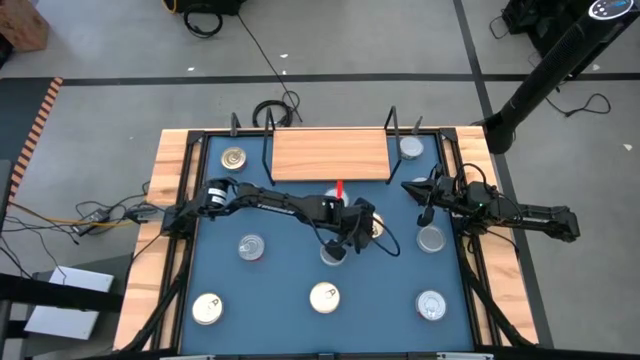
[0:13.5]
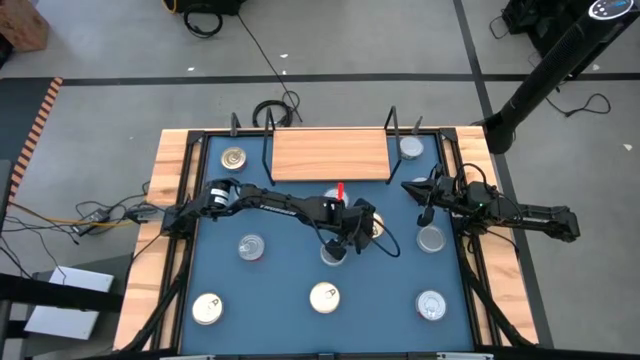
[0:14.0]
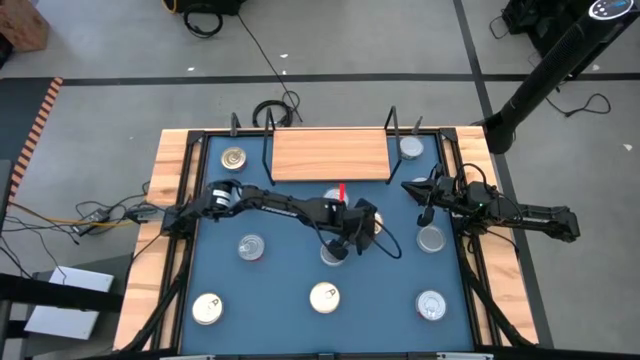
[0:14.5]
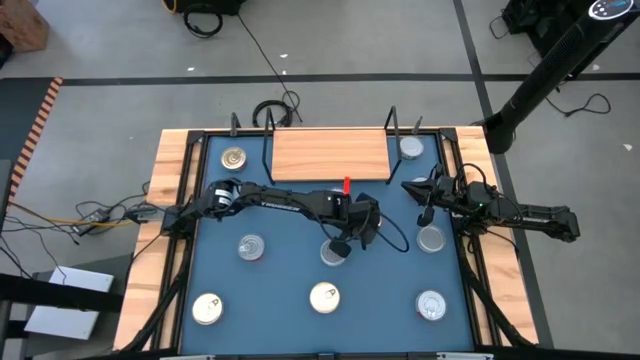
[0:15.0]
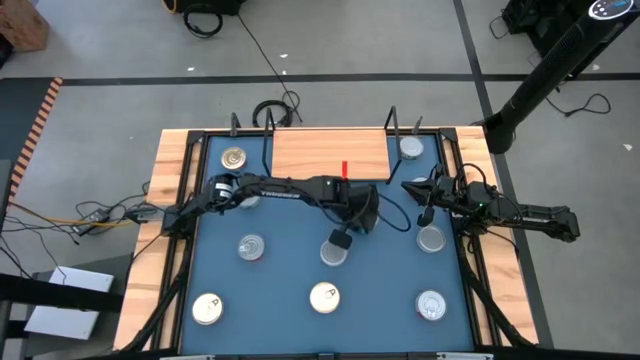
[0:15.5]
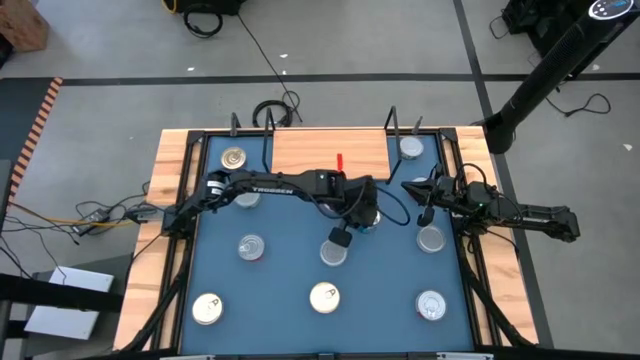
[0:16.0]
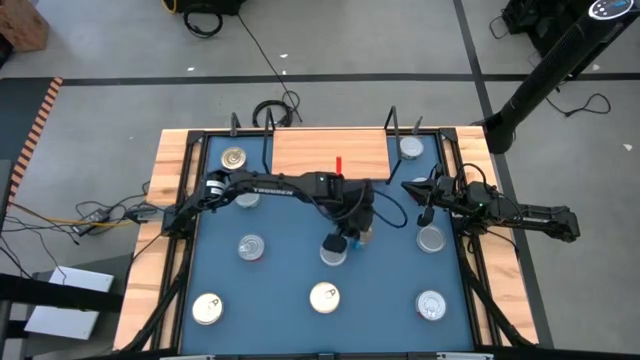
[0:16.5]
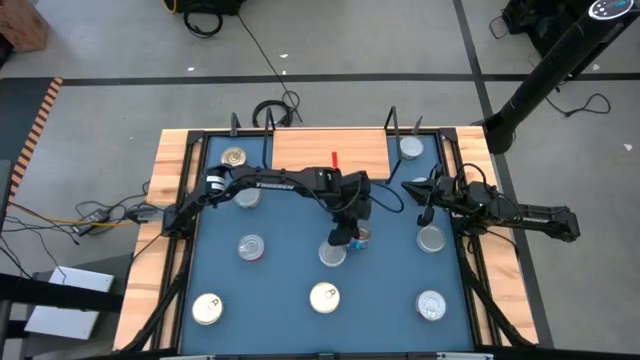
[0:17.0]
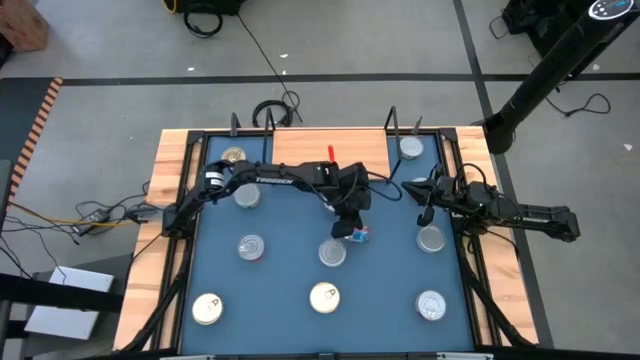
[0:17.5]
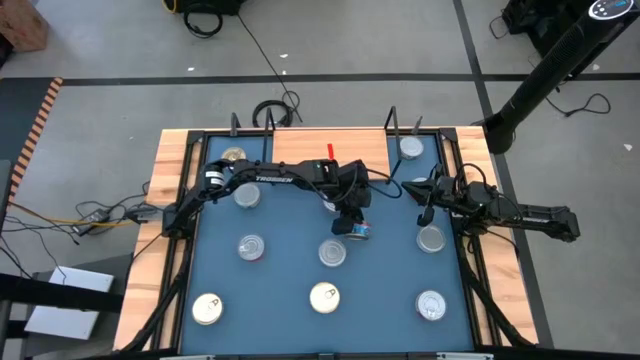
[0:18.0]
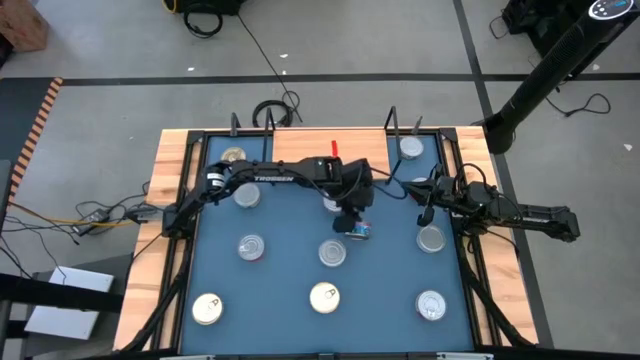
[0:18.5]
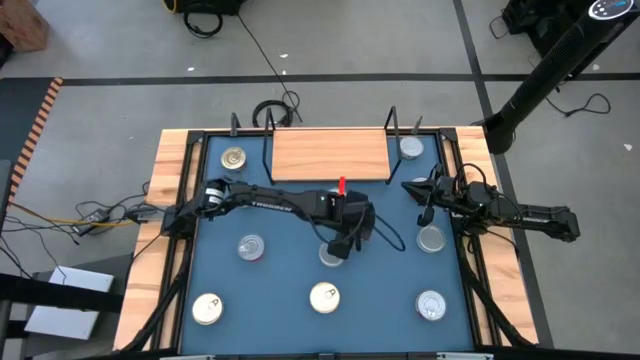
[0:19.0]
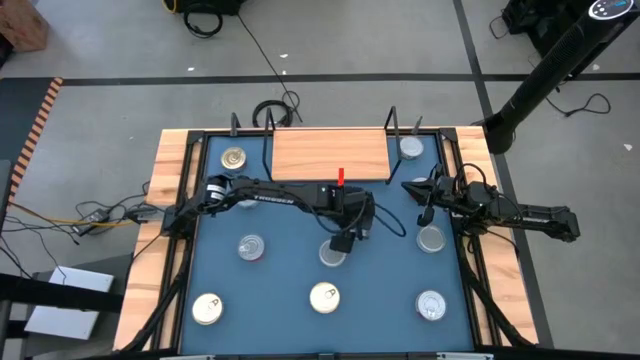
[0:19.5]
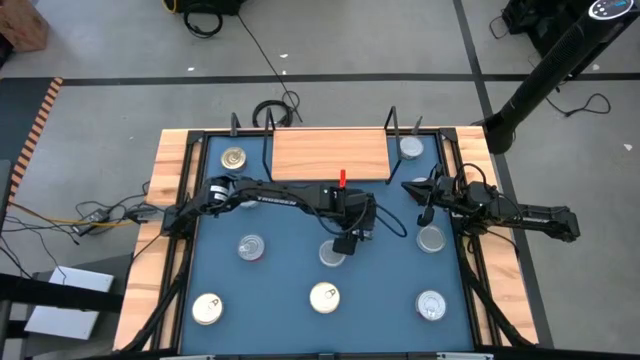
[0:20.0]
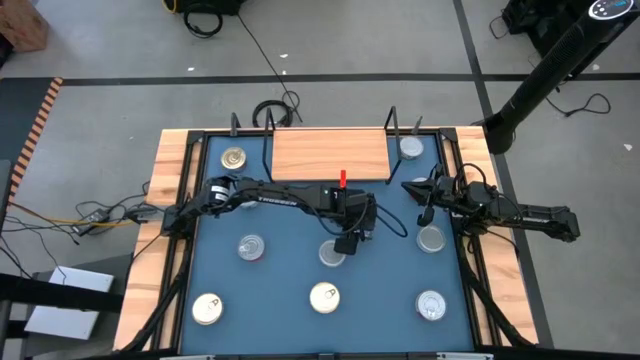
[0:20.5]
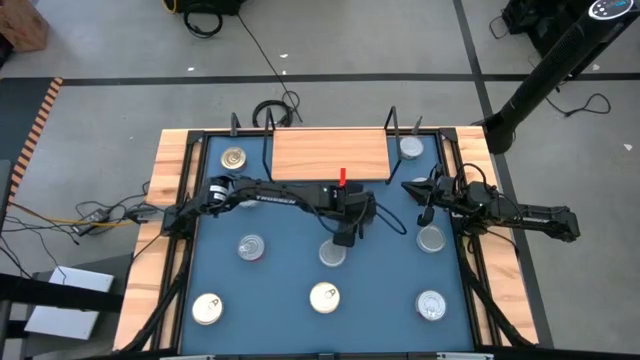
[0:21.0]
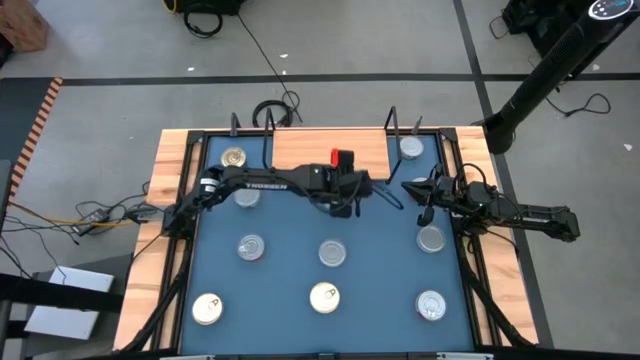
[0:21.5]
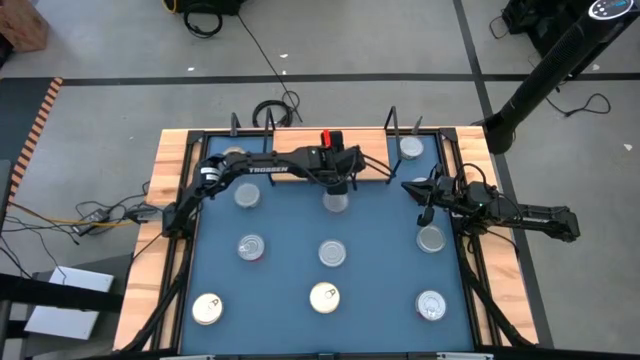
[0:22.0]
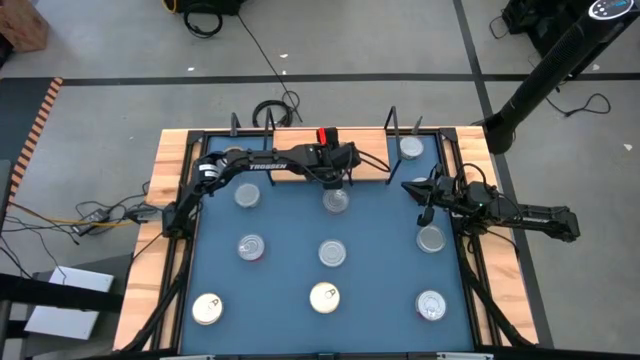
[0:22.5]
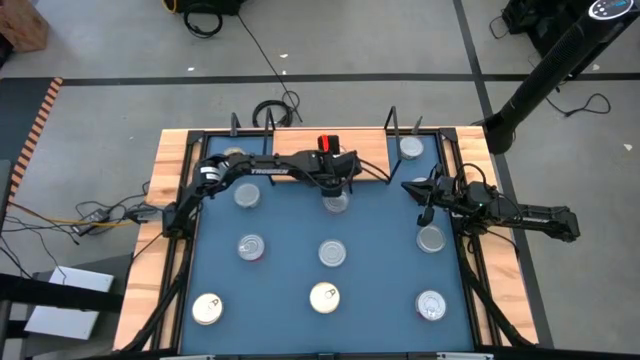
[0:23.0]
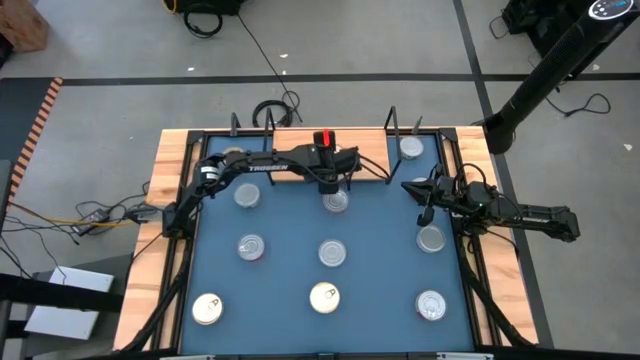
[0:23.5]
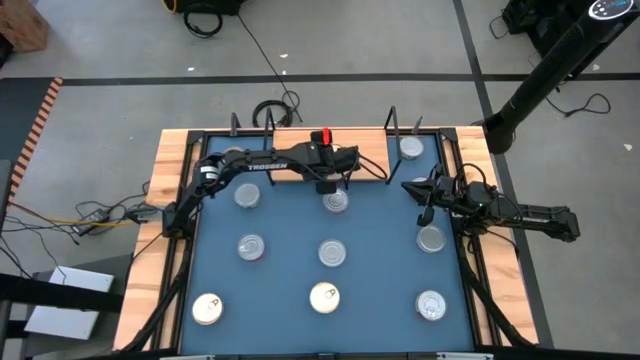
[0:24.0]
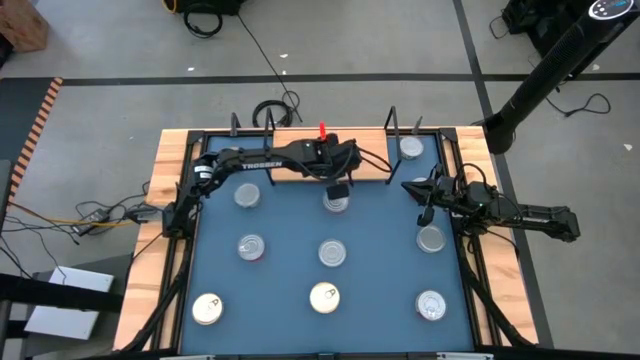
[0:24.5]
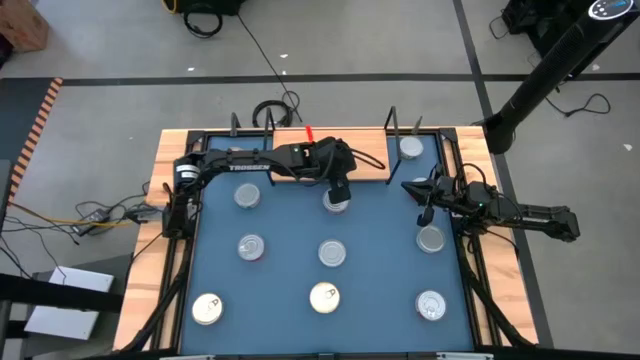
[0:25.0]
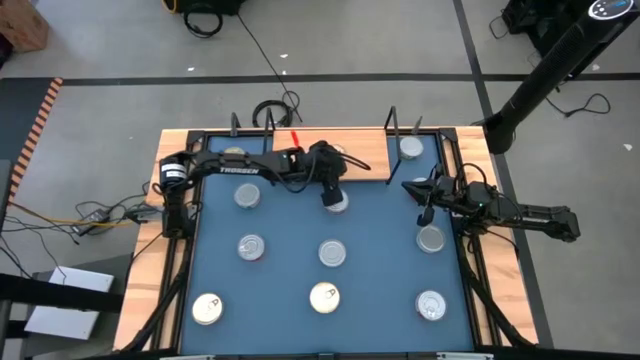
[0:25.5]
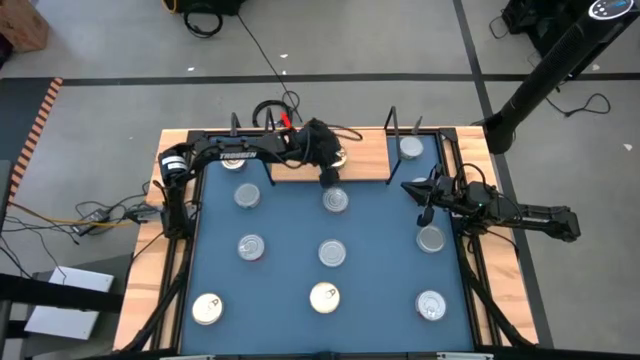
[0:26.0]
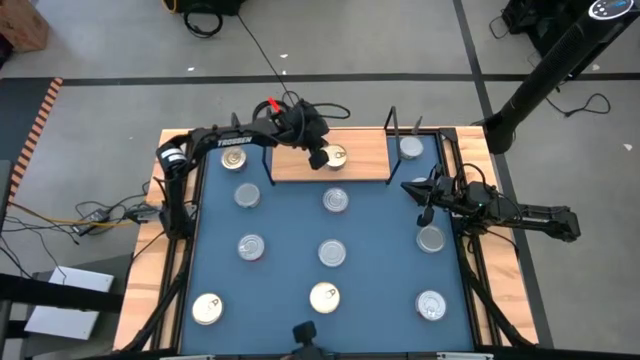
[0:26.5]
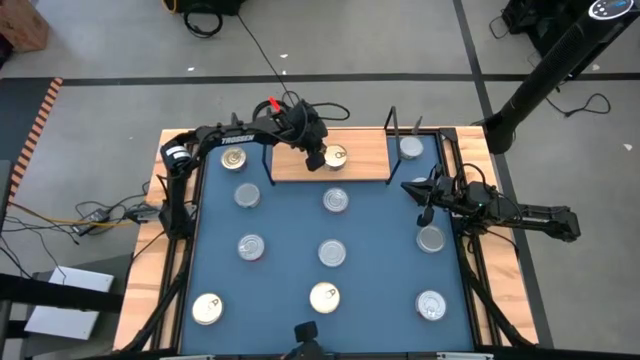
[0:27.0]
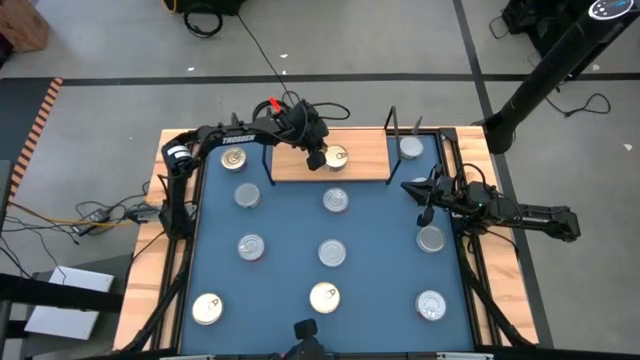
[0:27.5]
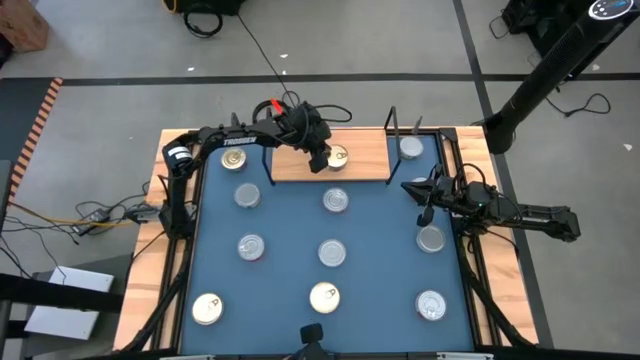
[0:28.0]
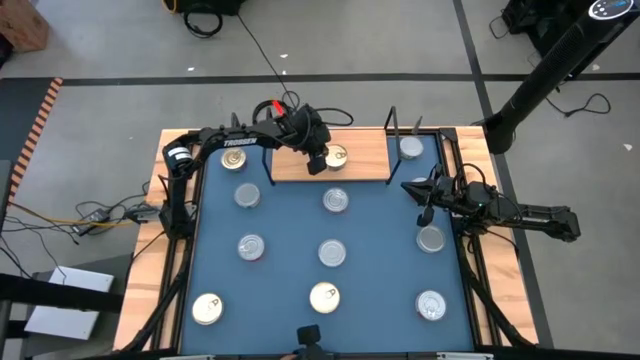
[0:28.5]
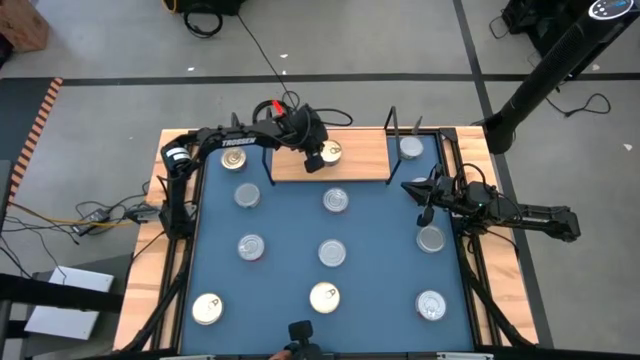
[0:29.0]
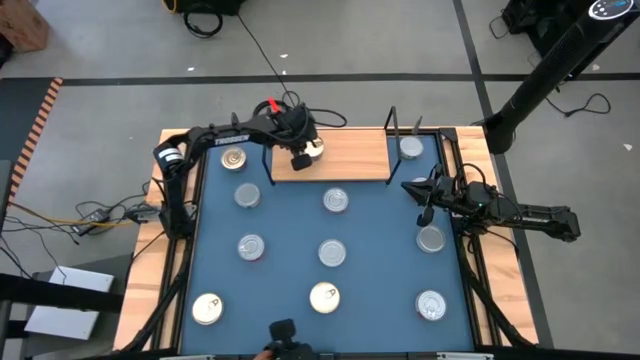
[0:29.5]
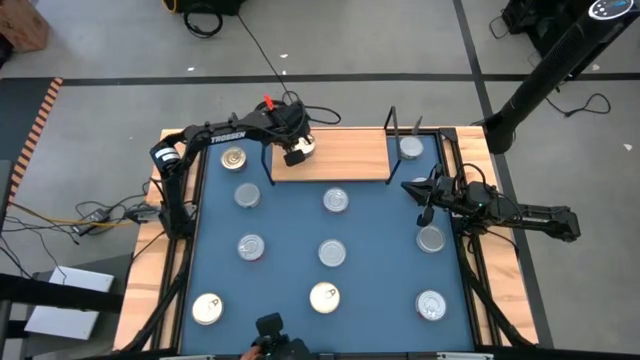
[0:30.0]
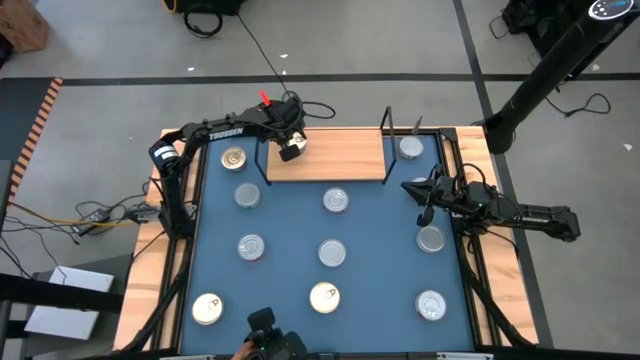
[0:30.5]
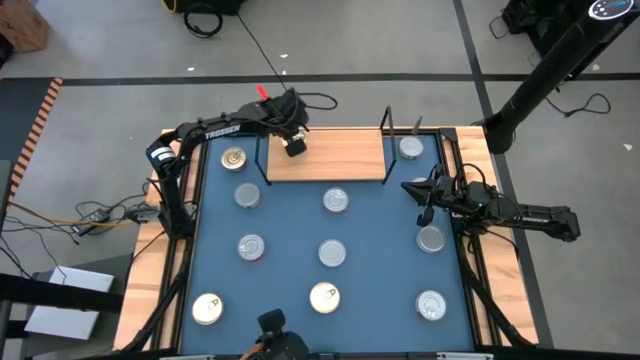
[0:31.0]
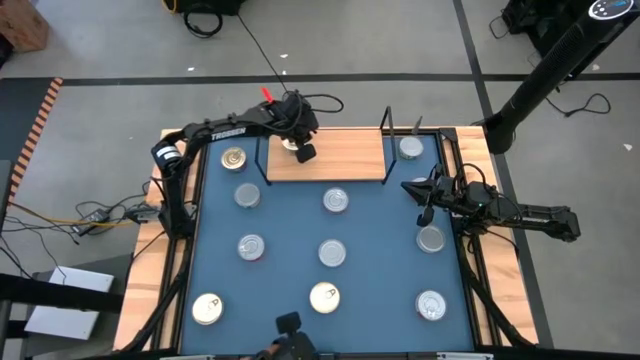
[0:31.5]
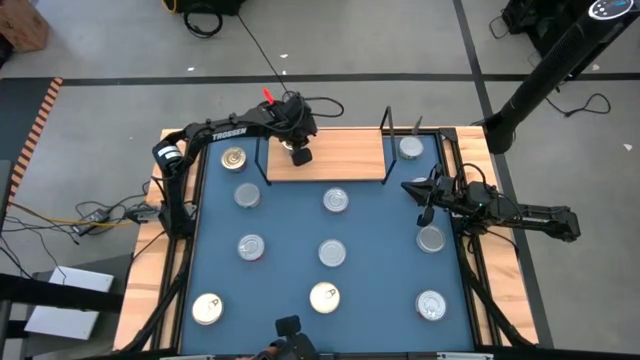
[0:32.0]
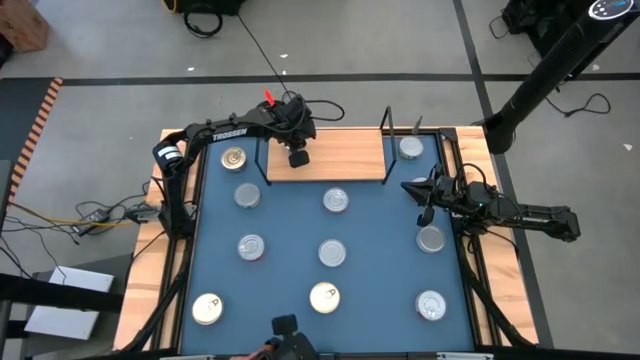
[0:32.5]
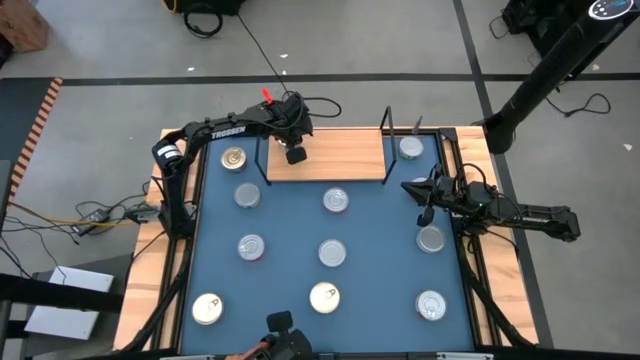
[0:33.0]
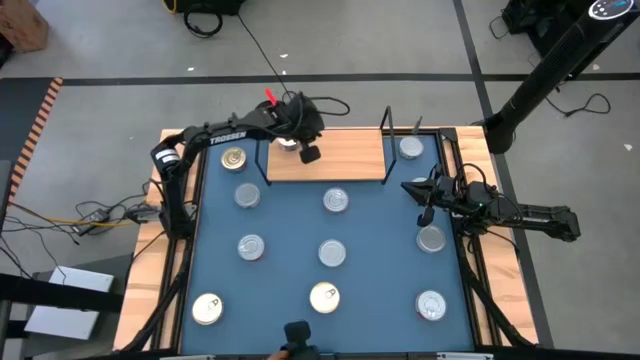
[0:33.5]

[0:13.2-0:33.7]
Task: Stack canned seafood by type on shelf
Put the top right blue tuna can on the shelf
